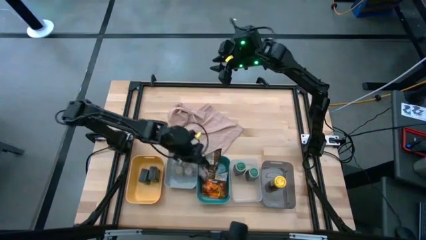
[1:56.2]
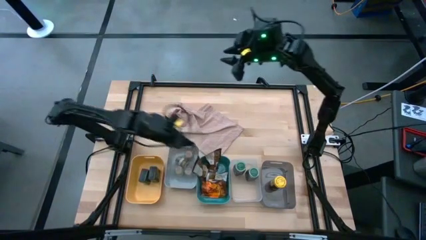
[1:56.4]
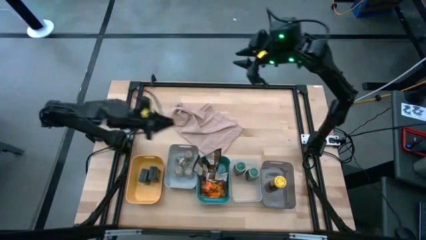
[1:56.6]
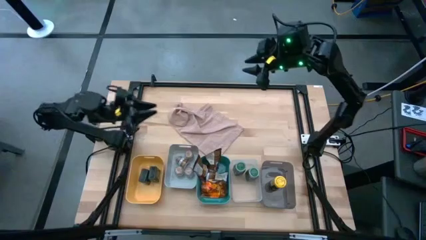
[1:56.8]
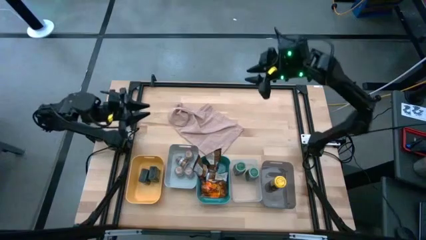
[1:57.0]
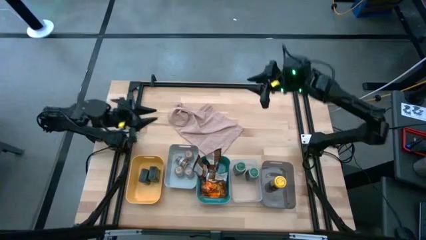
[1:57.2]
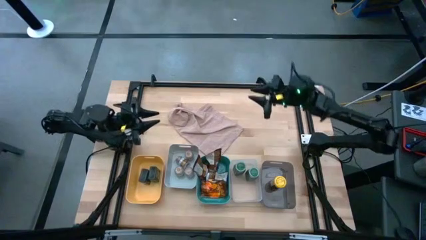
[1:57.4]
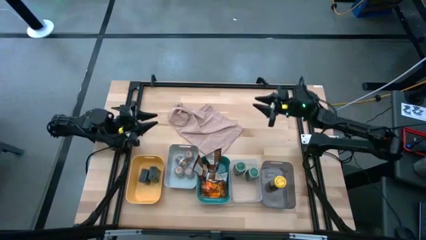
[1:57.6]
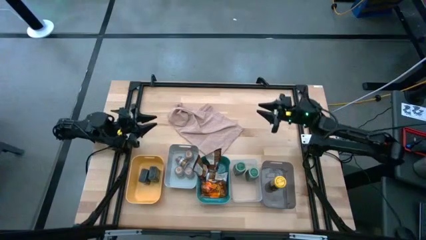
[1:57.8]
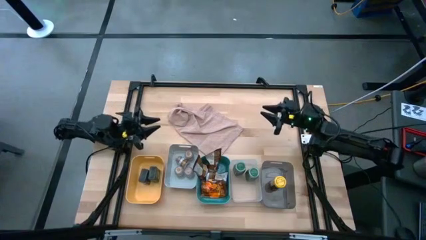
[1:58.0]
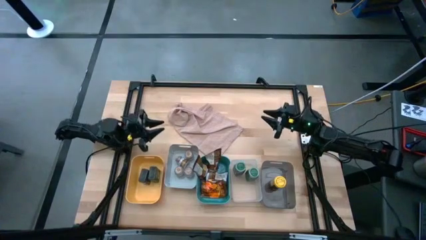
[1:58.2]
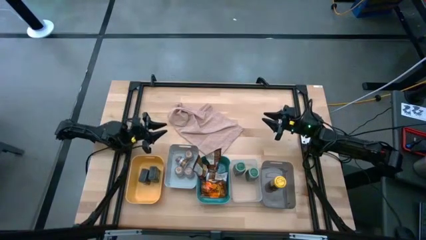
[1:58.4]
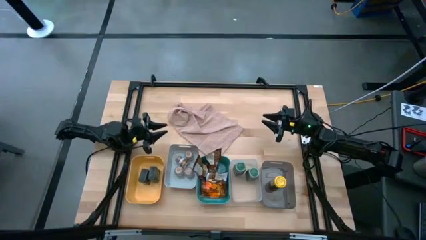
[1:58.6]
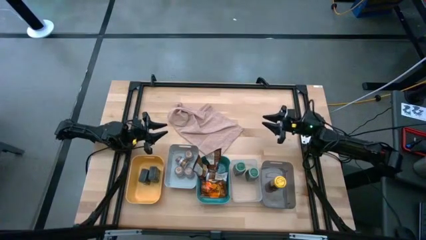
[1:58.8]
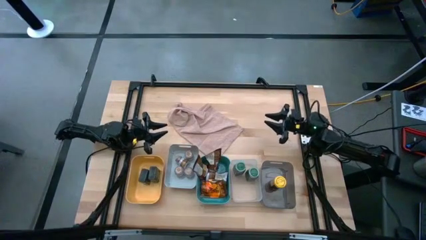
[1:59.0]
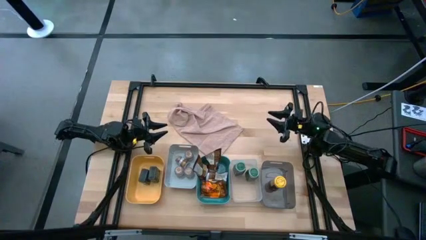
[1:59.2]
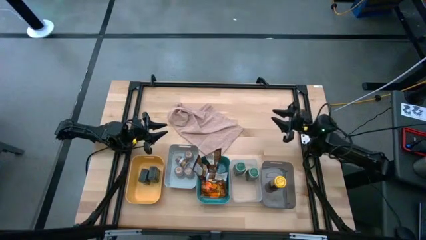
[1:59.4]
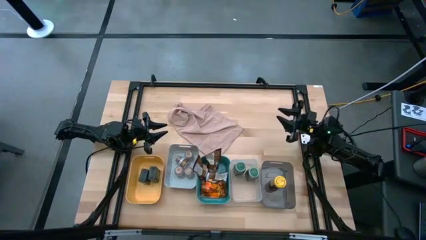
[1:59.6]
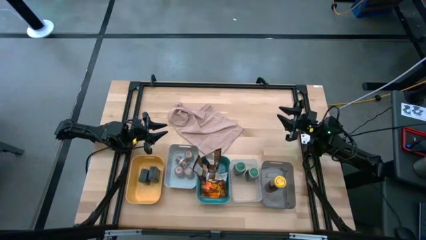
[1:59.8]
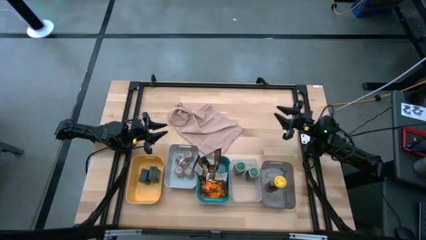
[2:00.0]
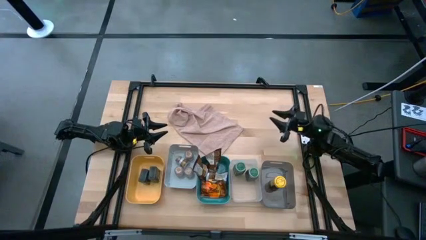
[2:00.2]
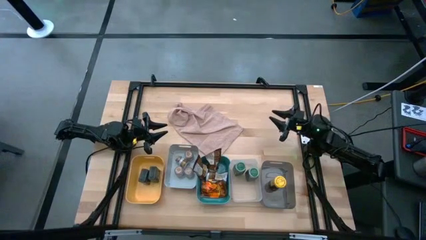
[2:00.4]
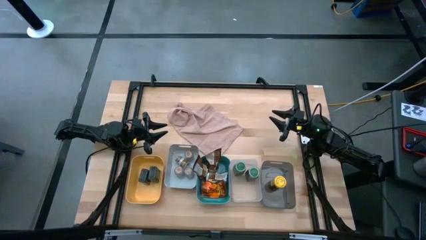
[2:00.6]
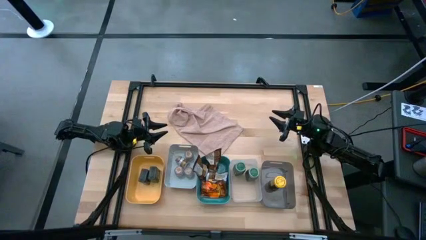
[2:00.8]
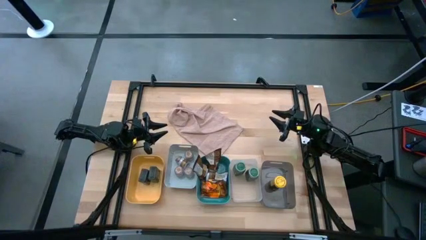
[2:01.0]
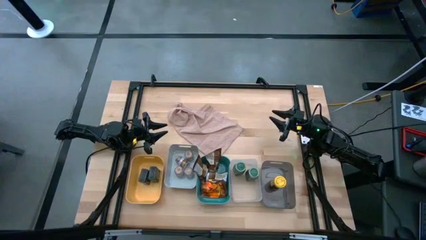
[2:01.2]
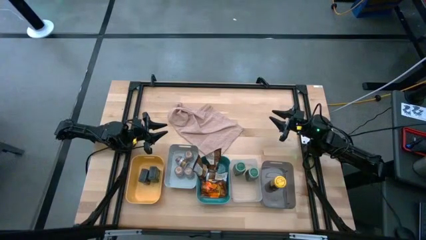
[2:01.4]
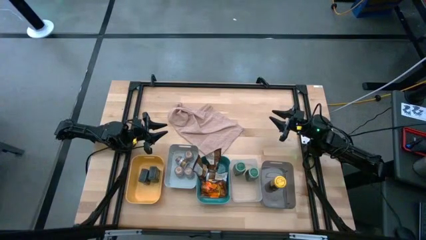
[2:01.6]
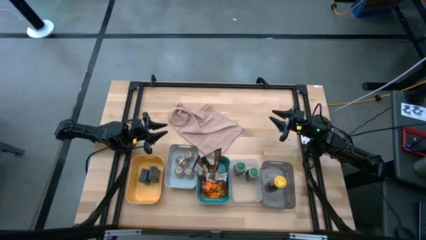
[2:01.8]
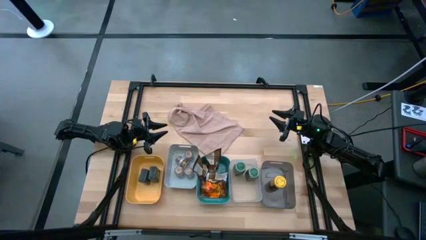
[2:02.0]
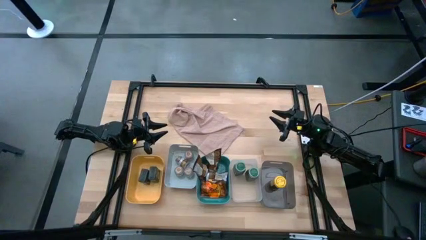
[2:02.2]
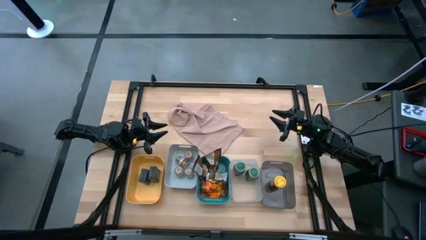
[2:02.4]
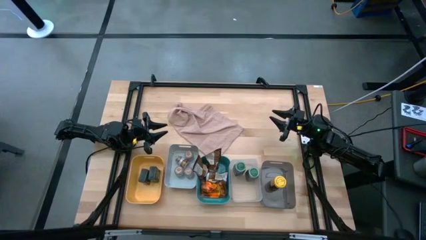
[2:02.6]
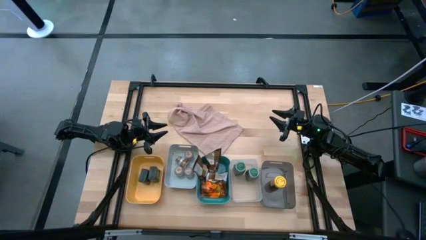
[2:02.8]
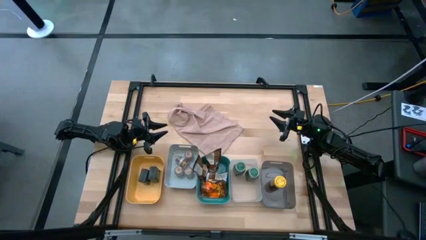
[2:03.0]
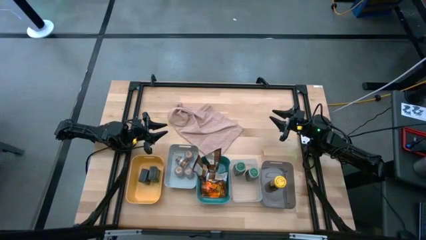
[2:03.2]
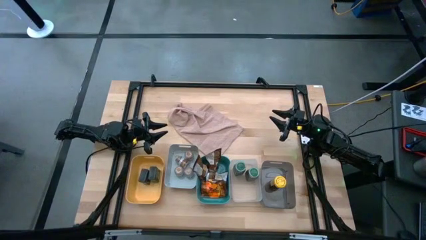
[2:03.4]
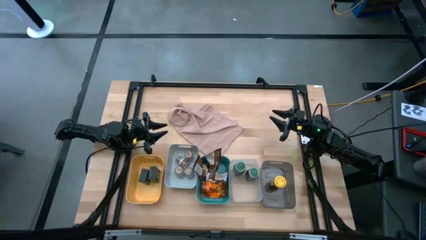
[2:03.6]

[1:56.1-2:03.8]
Task: Sort spices by type
Return to Home Position

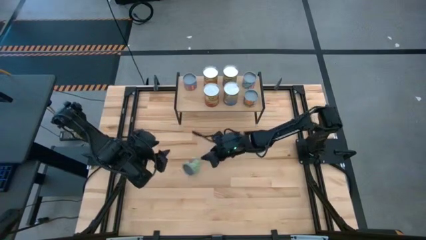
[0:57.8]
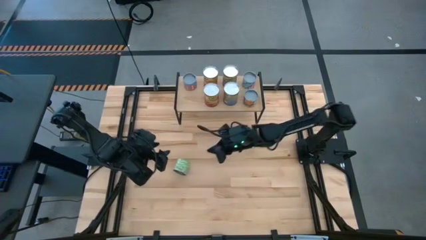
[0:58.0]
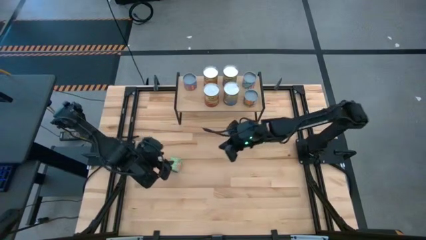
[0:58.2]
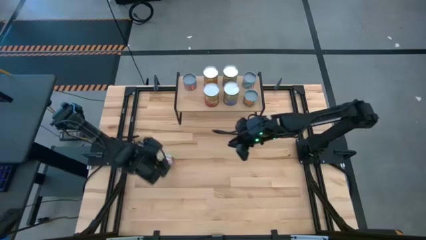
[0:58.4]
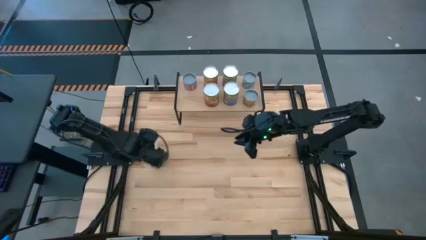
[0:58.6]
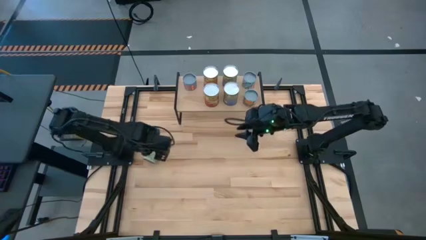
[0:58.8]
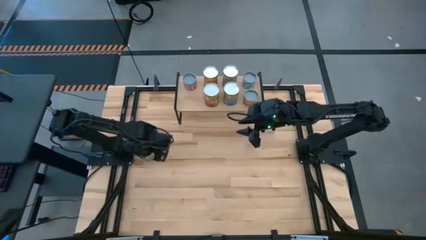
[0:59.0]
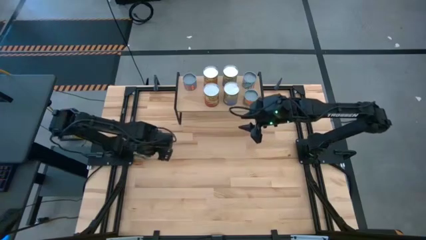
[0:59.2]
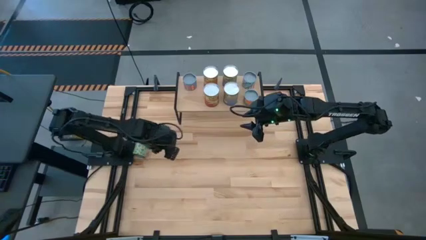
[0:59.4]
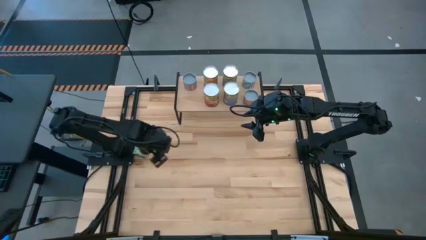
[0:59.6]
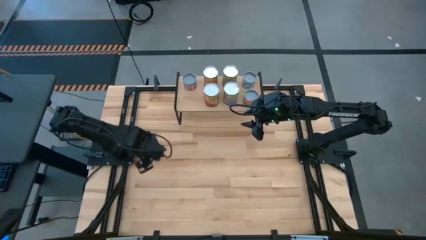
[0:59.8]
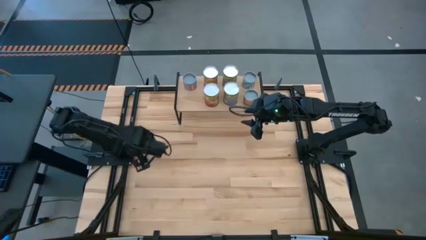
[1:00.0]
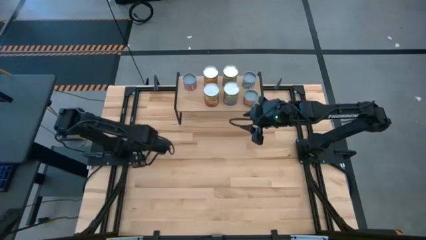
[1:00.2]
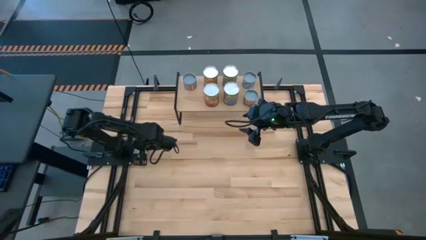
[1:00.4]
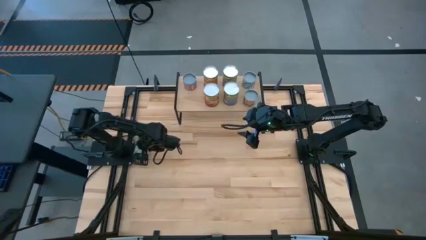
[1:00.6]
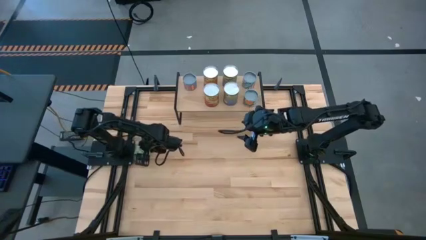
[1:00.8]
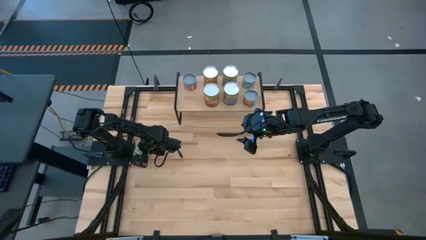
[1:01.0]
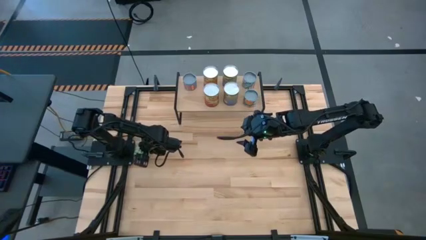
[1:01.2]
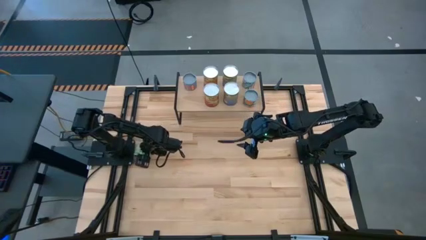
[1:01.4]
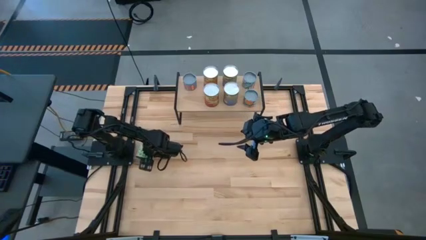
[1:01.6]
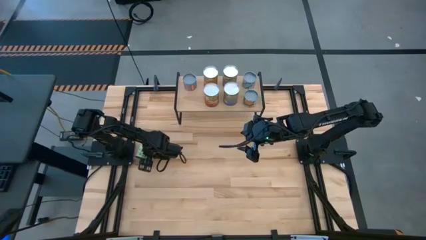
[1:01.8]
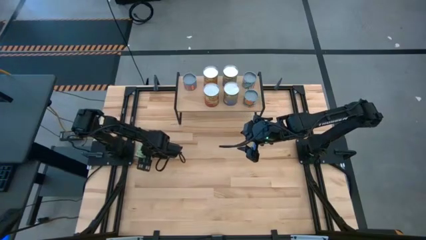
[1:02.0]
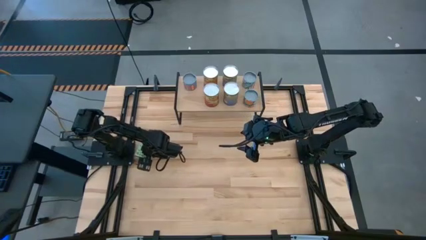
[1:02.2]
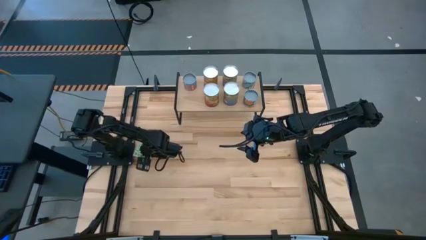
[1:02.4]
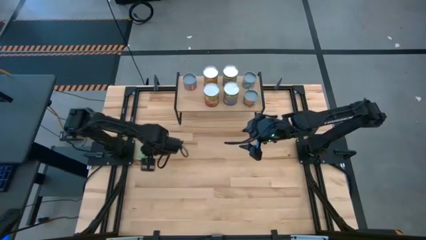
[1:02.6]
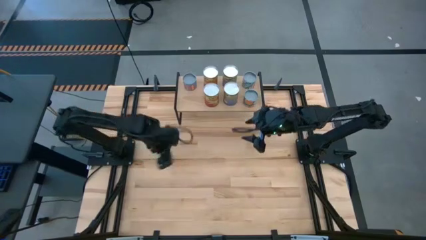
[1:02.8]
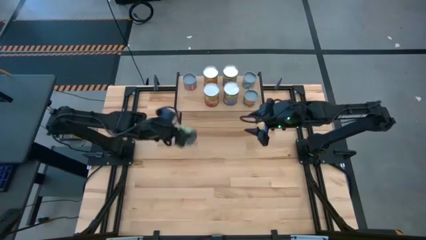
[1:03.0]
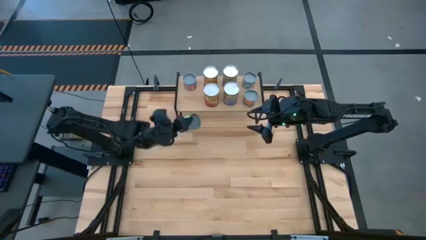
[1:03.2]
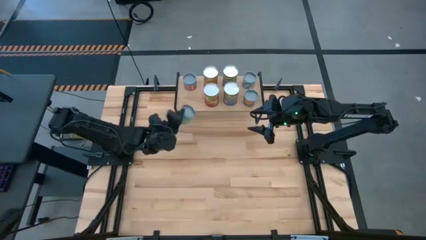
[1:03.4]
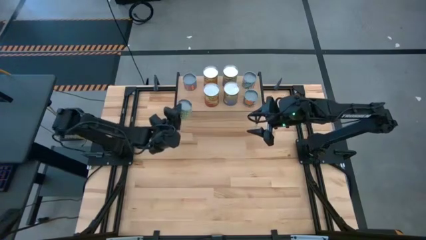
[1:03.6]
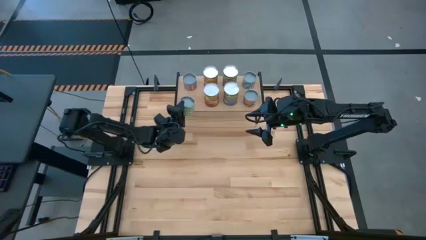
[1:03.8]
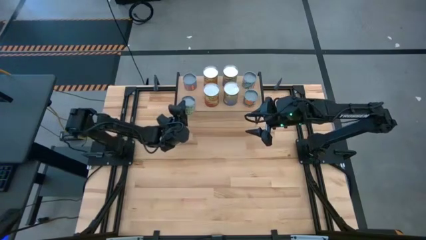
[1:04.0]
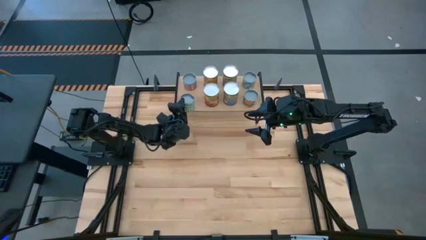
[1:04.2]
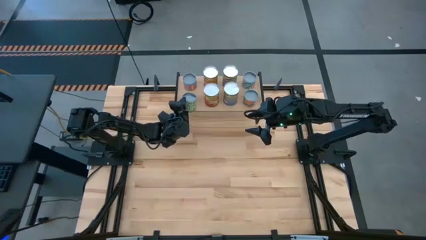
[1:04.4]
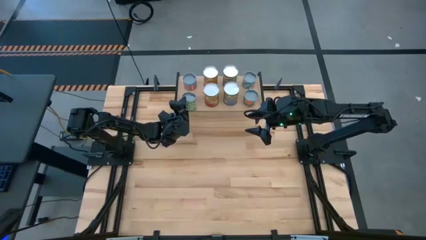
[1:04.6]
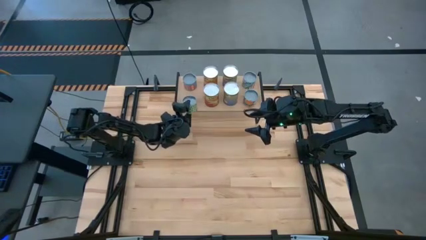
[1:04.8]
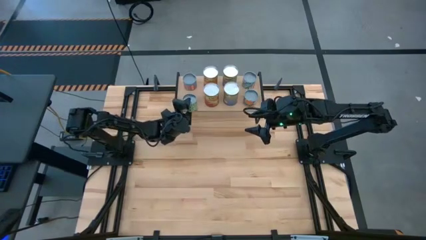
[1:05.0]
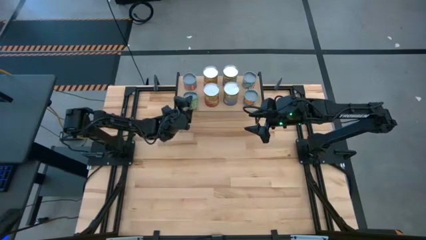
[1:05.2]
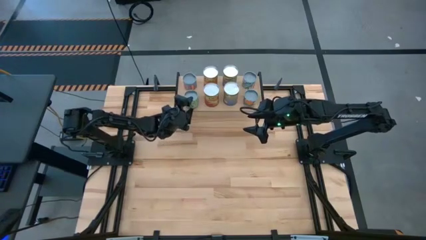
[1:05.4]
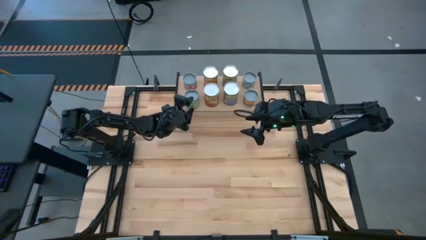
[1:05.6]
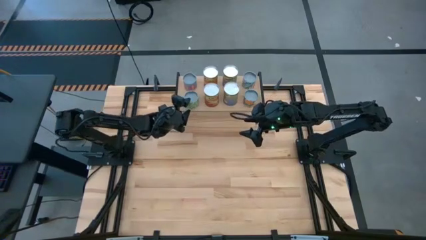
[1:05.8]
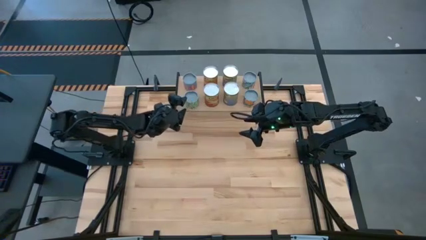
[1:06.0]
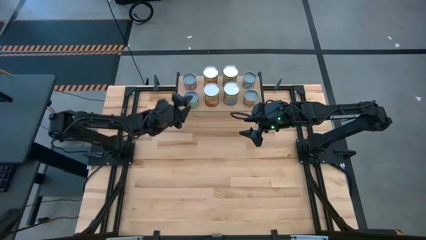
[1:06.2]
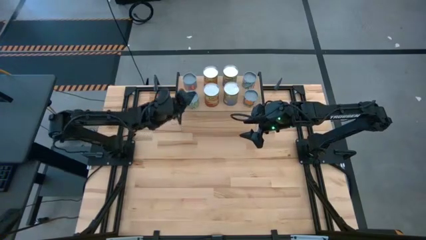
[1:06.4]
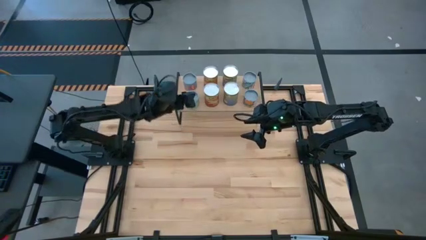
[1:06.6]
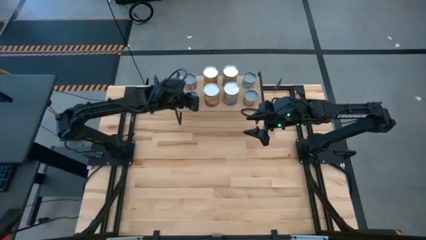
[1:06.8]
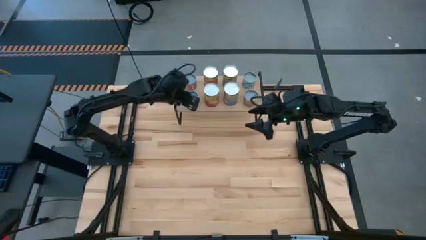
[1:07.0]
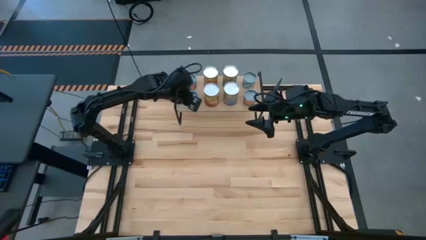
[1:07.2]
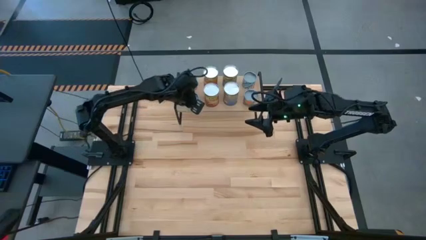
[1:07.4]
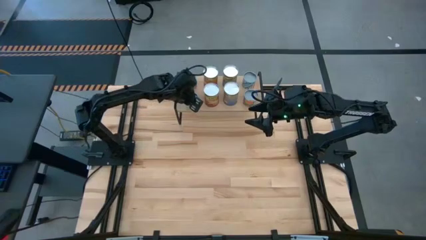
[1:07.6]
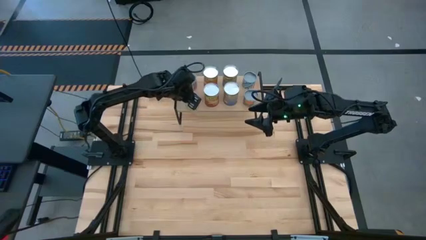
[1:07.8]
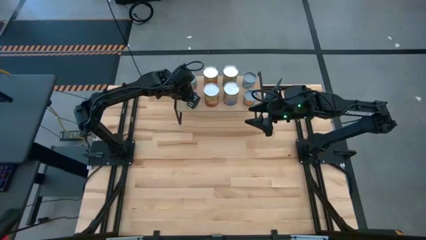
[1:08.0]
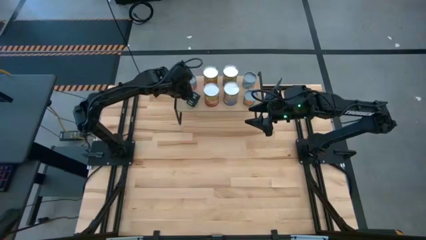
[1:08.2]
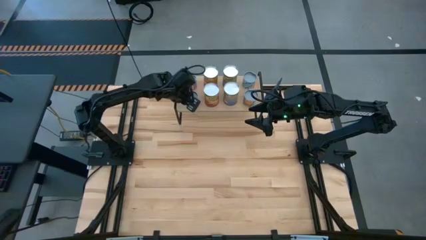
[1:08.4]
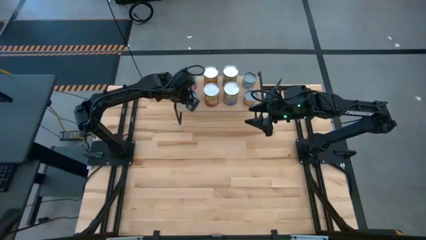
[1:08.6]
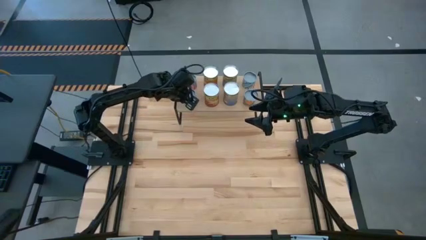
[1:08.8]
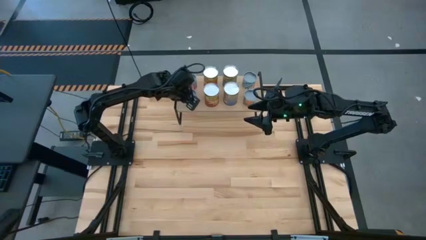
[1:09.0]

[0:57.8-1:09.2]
Task: Pick and place cans onto a shelf
Put the canned green peas on the shelf
